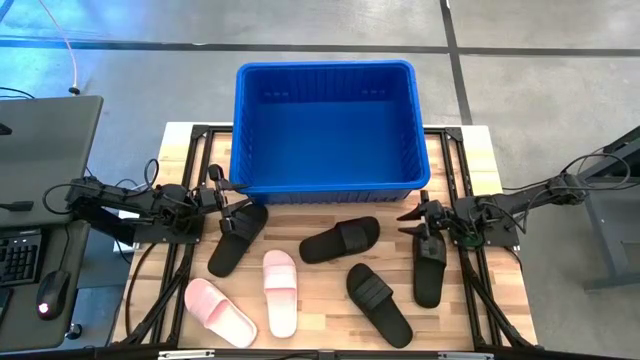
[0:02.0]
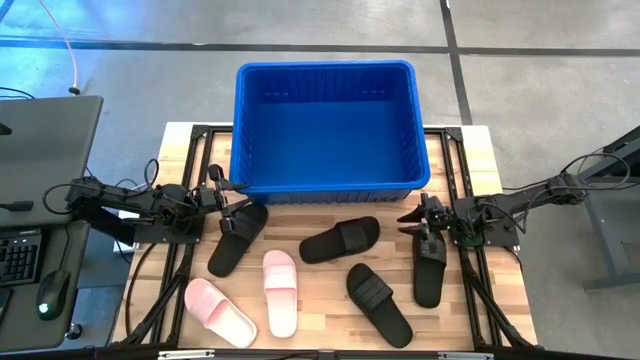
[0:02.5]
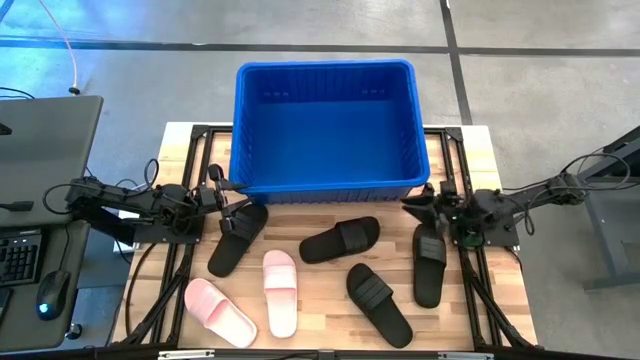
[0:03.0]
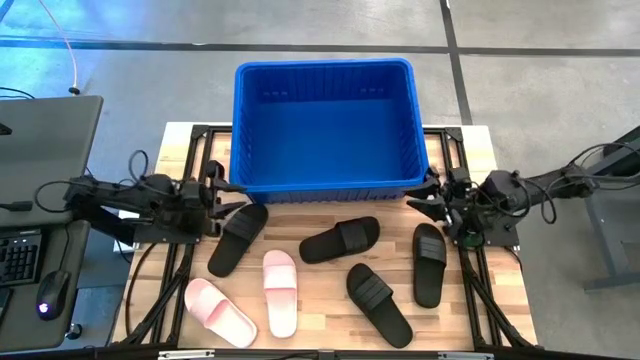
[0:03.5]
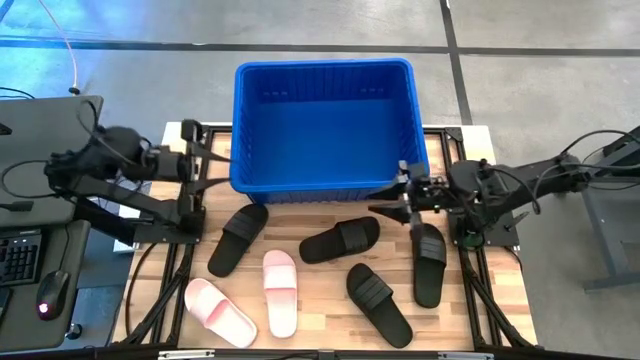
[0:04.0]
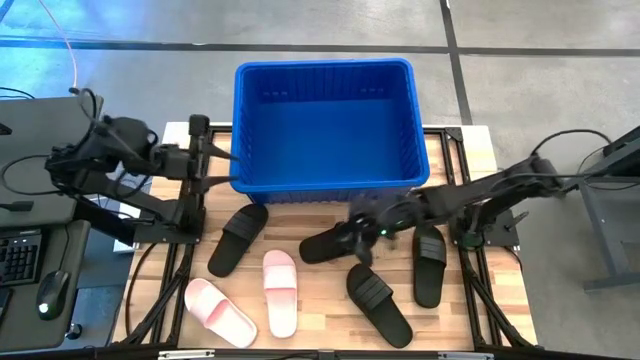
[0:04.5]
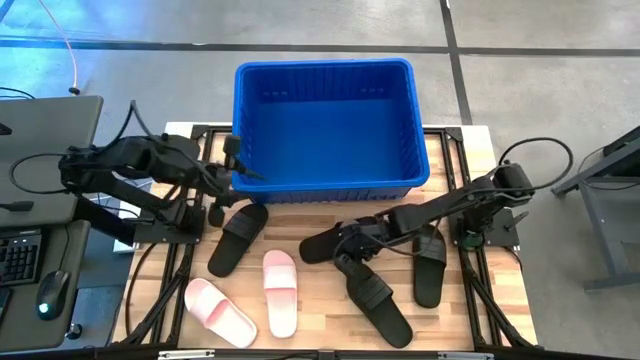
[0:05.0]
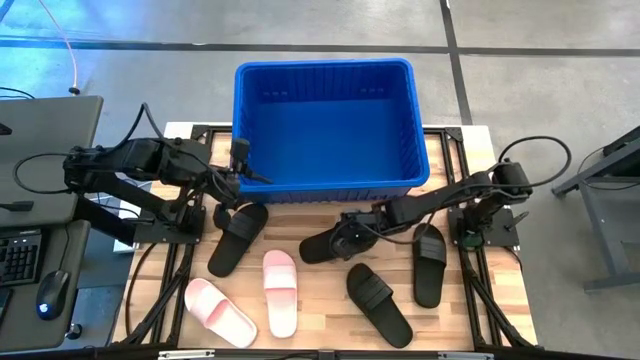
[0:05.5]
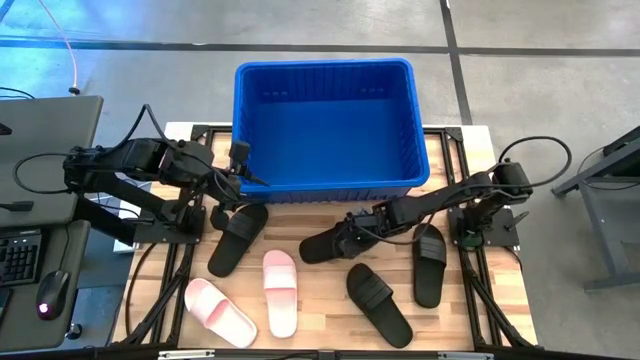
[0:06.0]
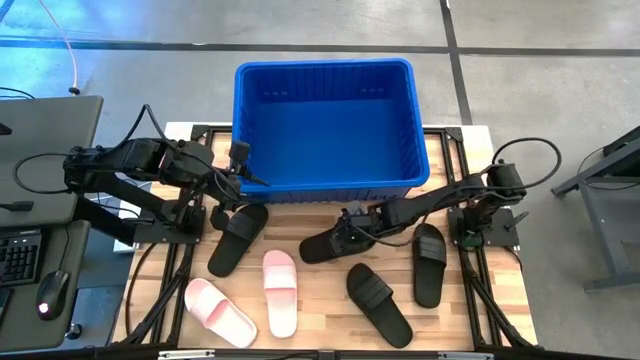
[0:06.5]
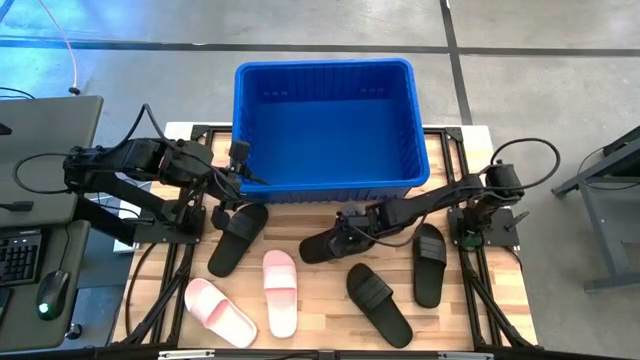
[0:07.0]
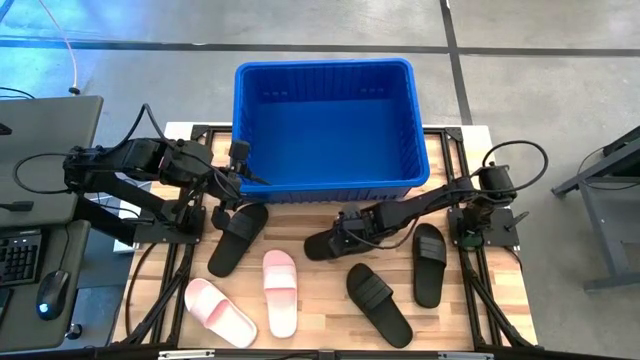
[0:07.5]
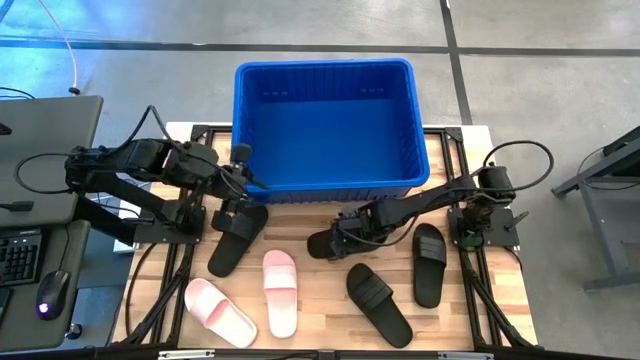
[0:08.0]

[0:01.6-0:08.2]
Task: Pick and place slides into bin
Adjust the black slide

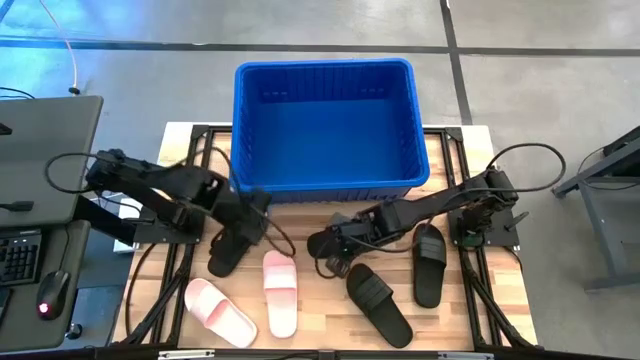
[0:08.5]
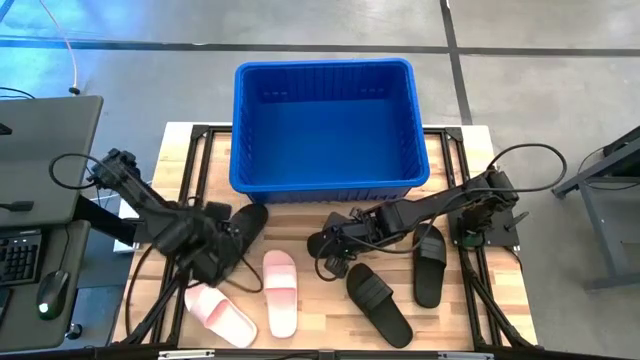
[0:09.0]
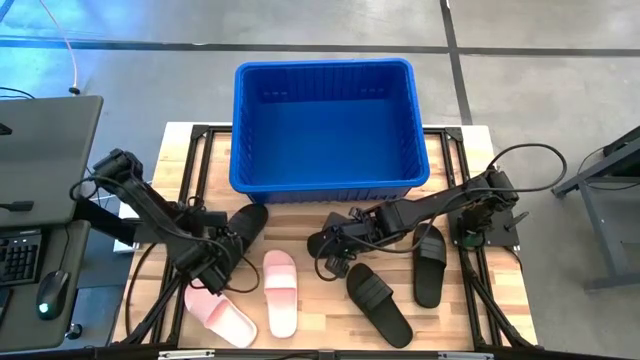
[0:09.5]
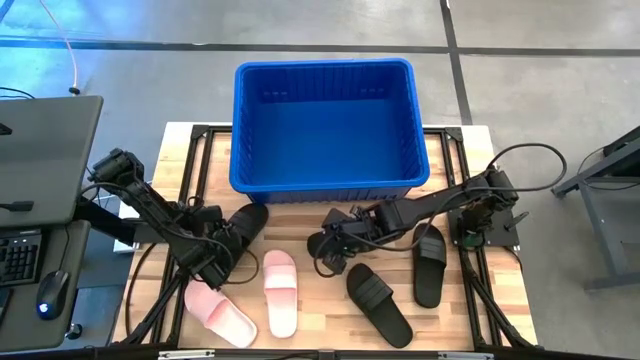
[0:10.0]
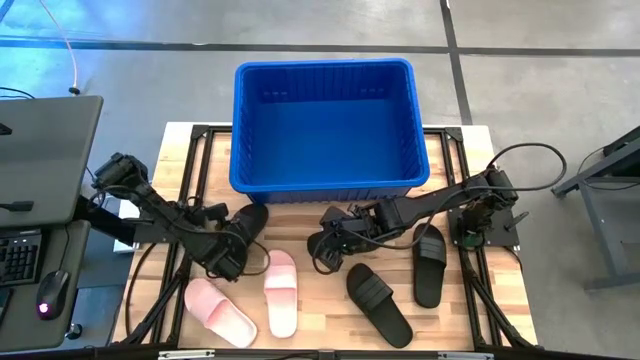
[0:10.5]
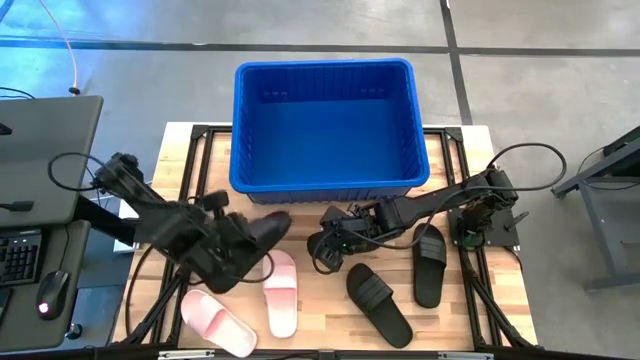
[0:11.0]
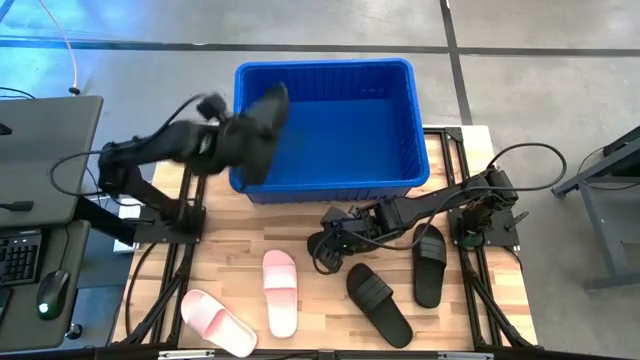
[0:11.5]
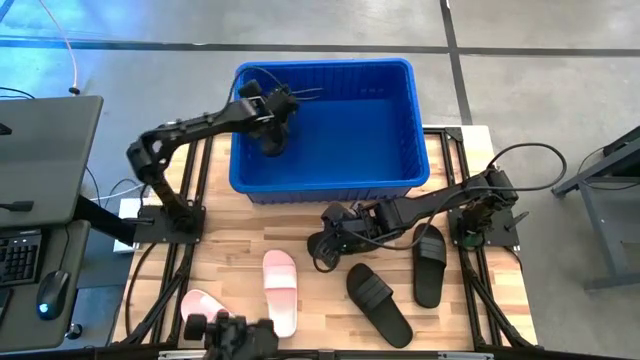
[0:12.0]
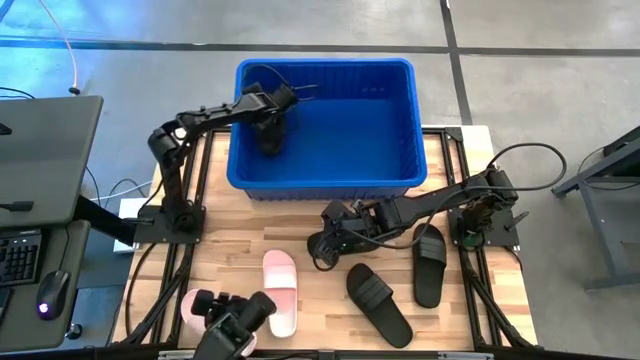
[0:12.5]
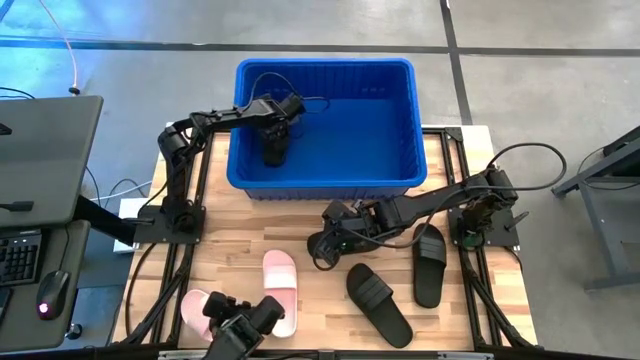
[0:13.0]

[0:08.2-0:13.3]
Put the black slide into the blue bin

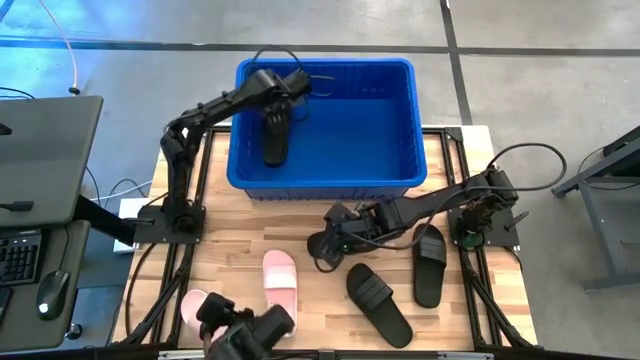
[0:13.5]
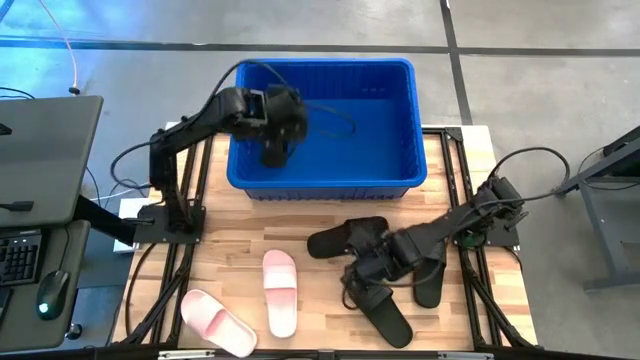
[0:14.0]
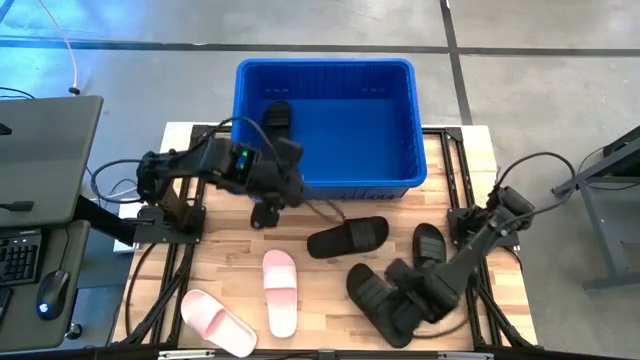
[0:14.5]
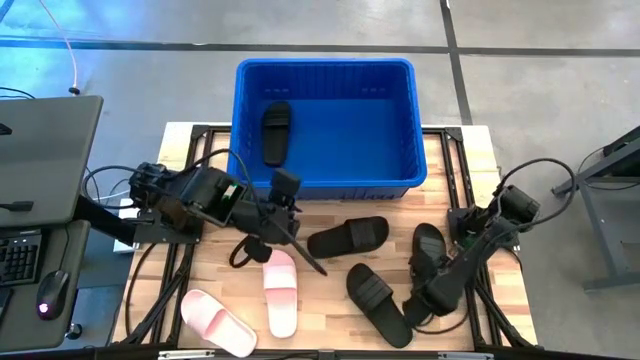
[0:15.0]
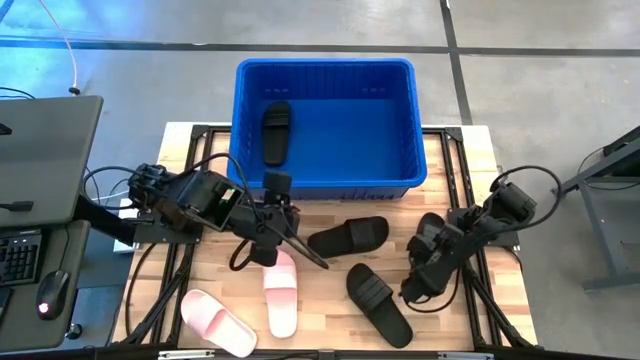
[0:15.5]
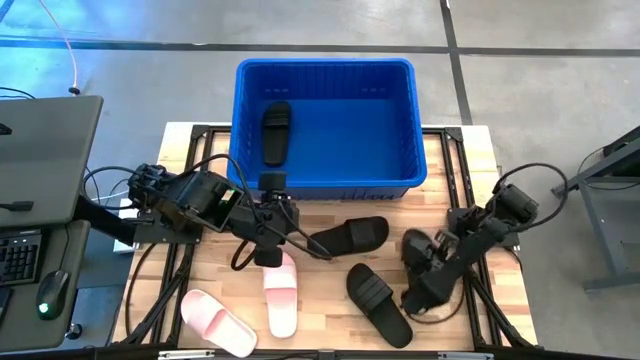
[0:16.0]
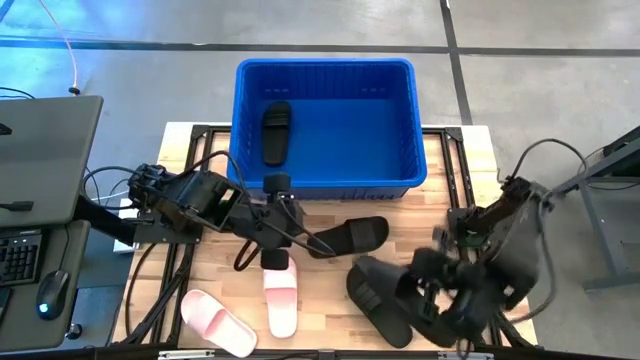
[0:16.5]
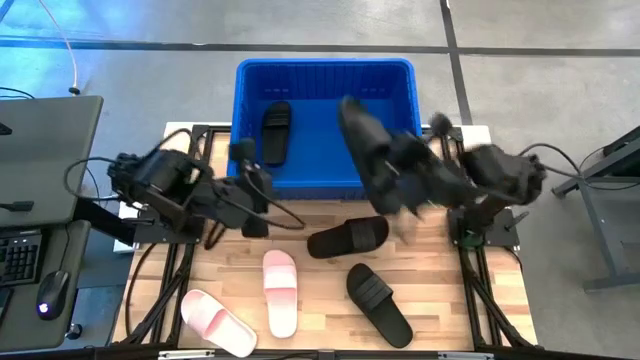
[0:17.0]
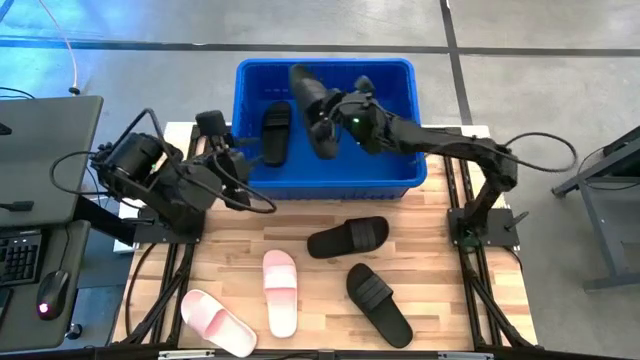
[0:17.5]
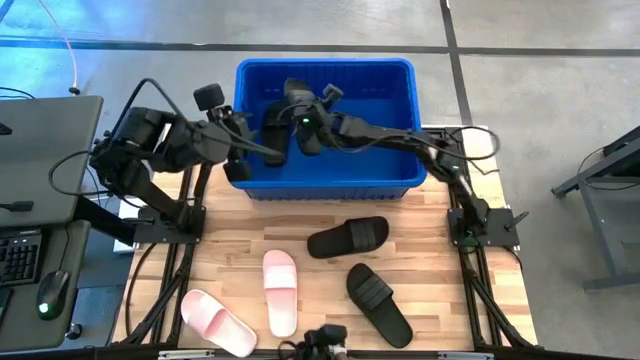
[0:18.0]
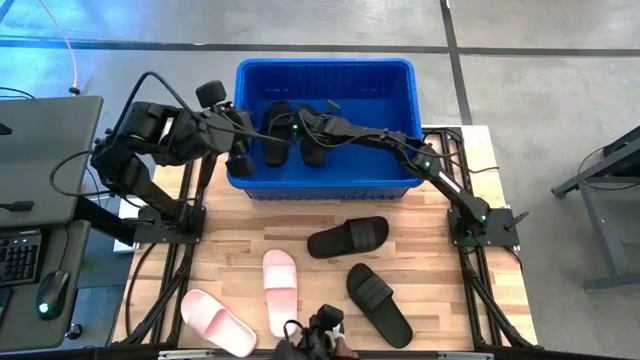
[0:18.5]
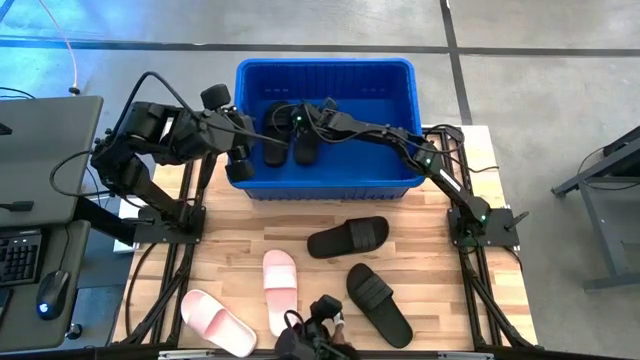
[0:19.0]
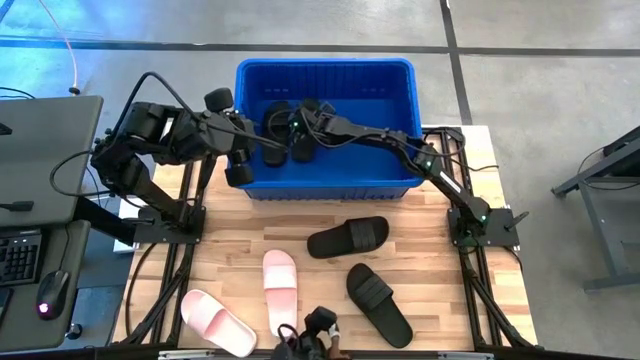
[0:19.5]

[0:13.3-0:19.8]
Put the black slide into the blue bin

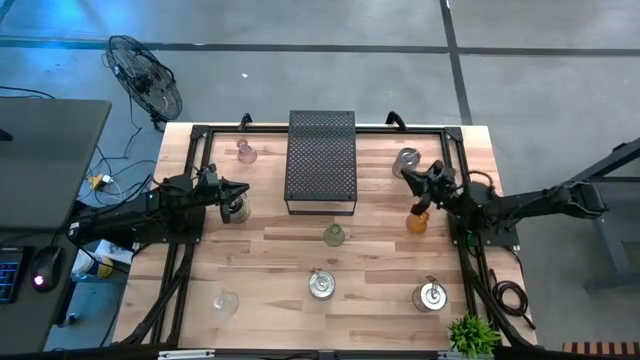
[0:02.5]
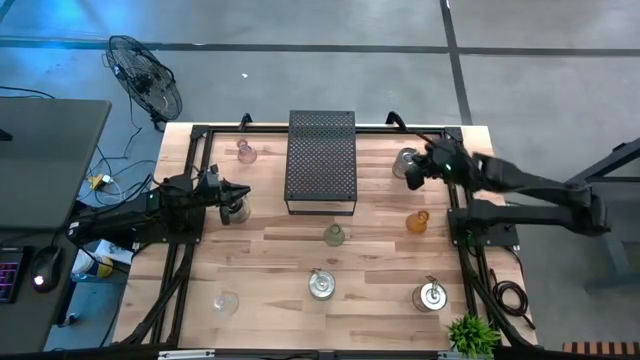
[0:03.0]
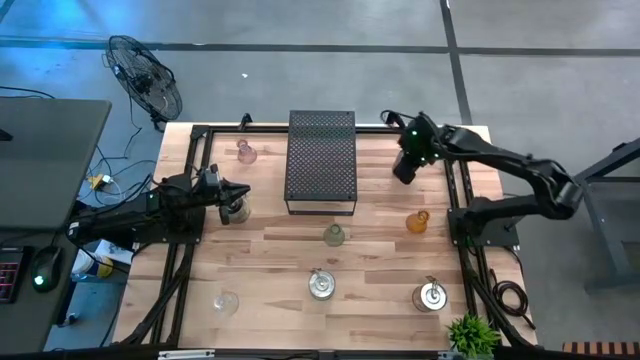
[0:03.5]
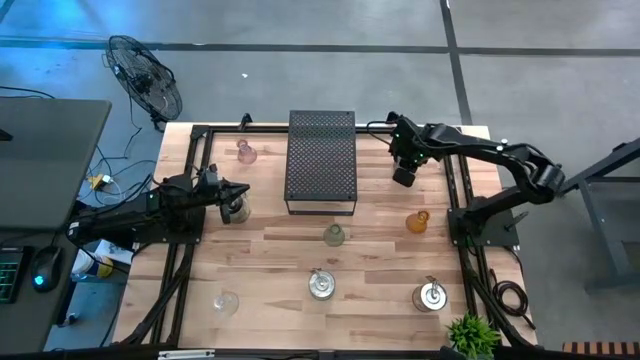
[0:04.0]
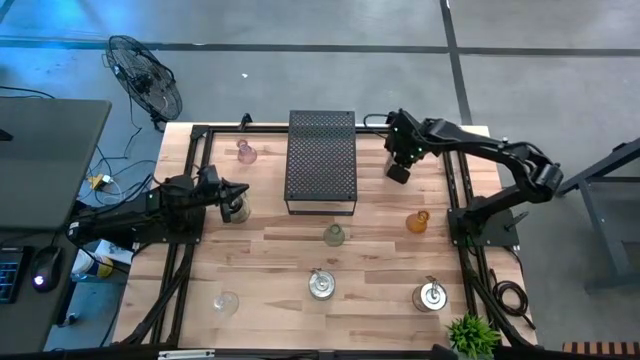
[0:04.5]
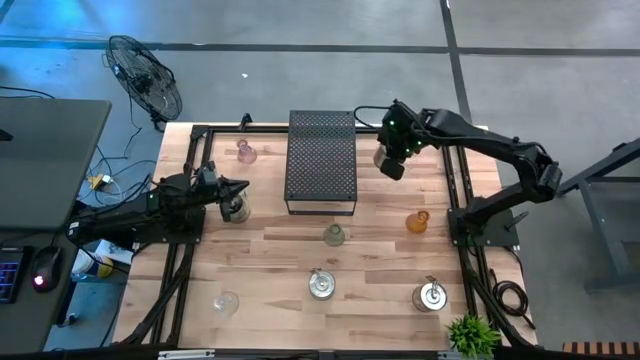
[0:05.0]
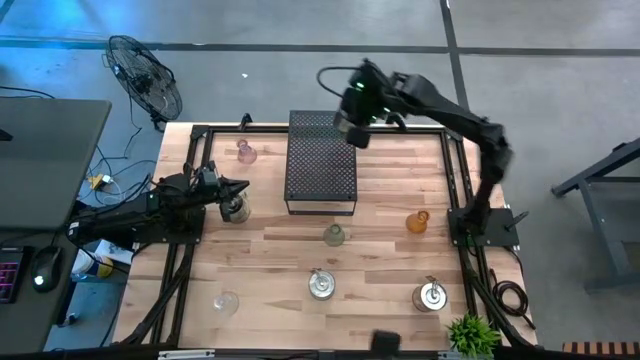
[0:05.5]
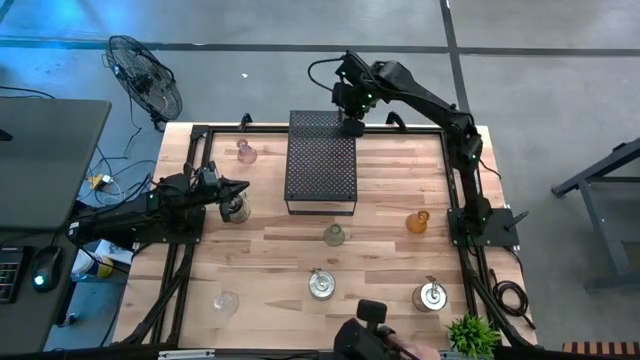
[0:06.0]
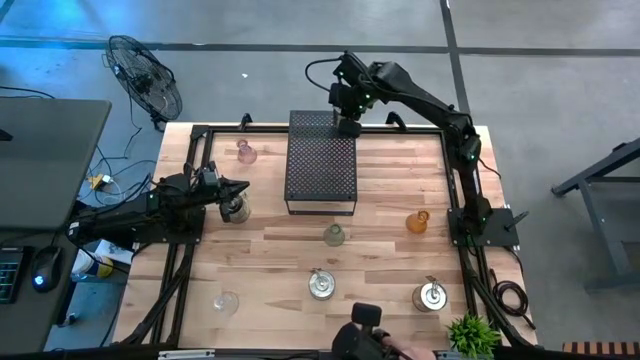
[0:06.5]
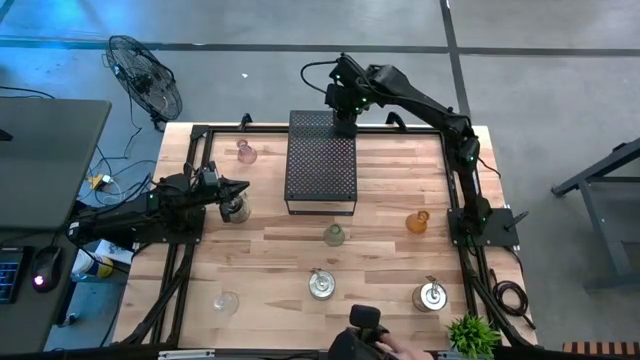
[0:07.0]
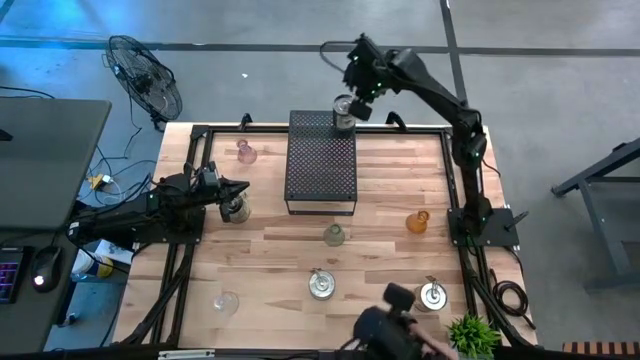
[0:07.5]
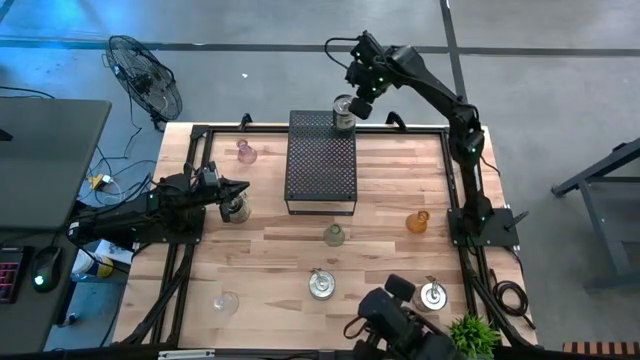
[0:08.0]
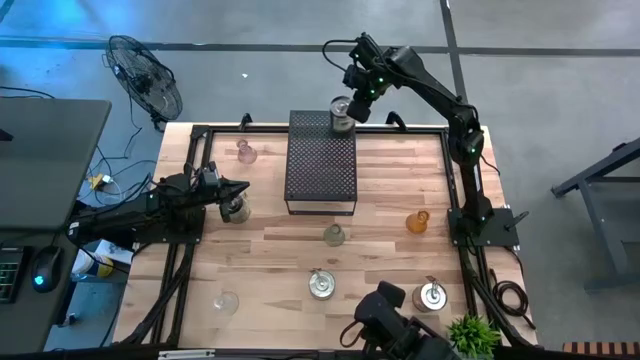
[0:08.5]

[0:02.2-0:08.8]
Task: Pick & Place candle stick holders
Put the right green scented candle on the shelf
